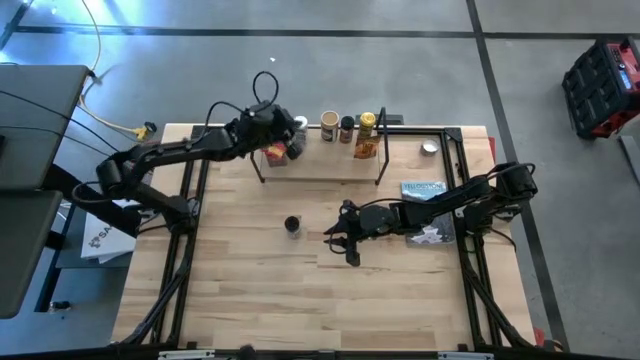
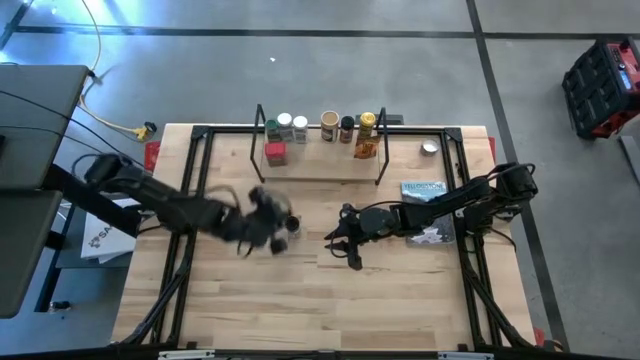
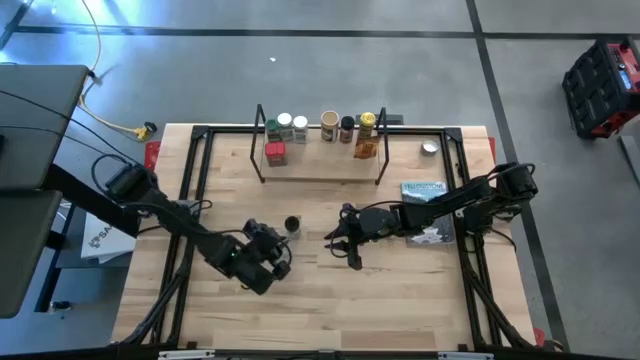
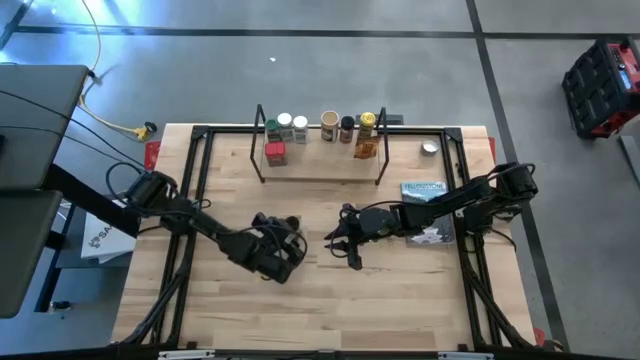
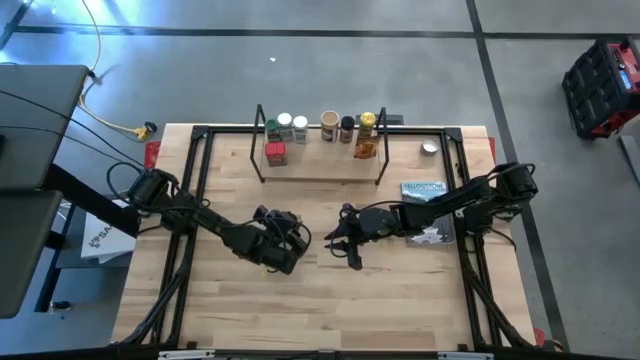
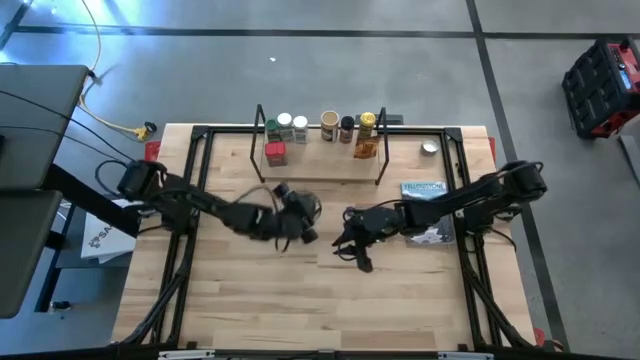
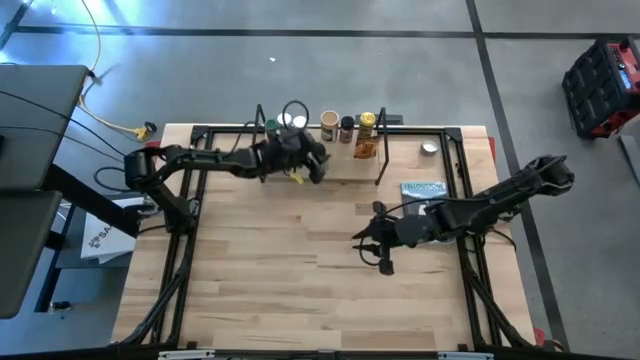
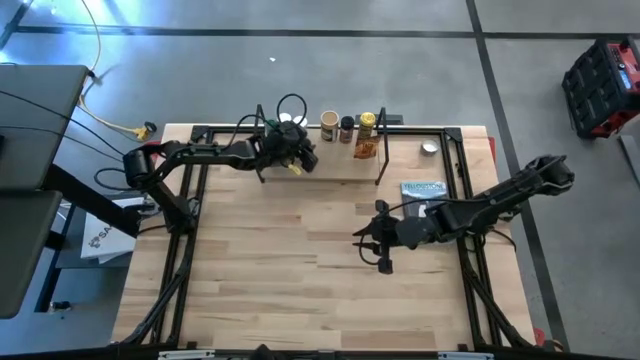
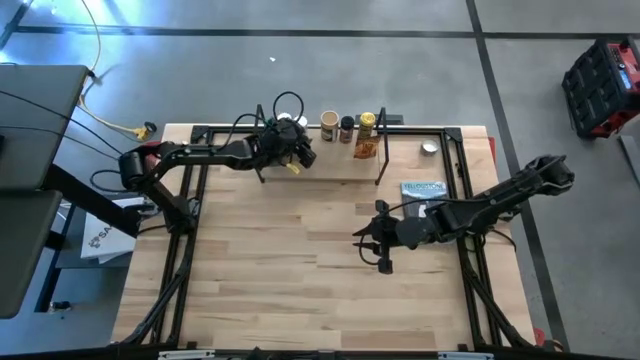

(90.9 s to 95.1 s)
Task: Shelf spices
Put the black seasoning bottle on the shelf

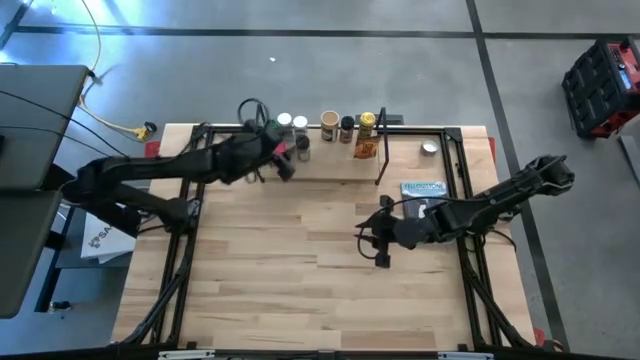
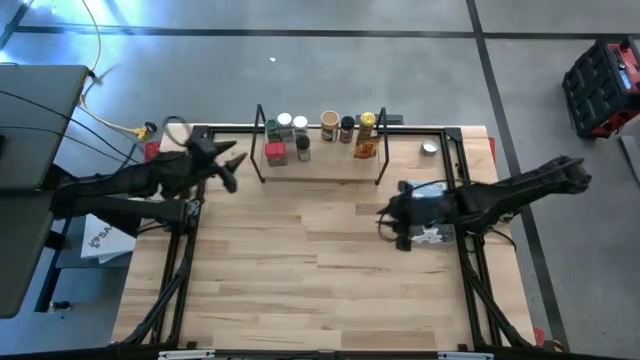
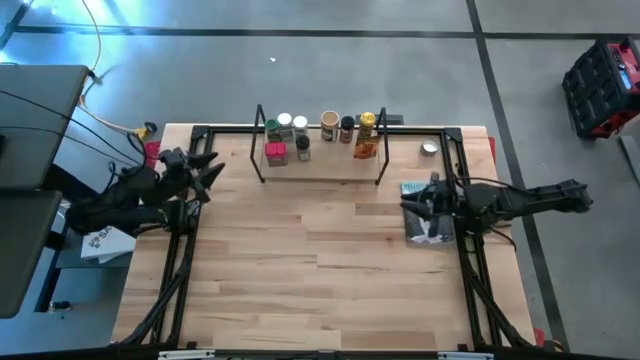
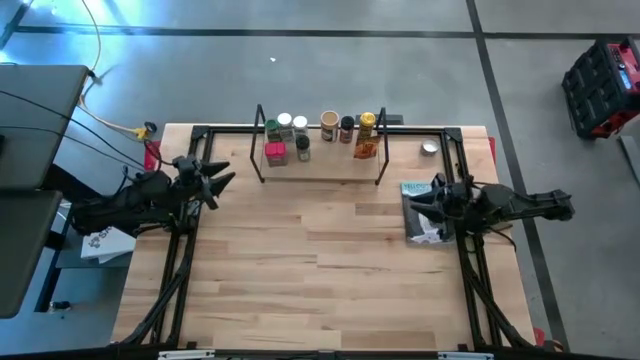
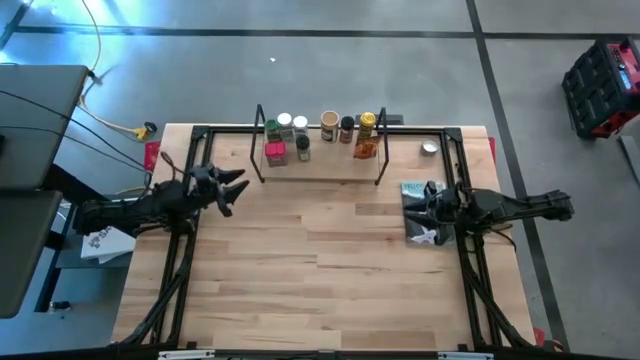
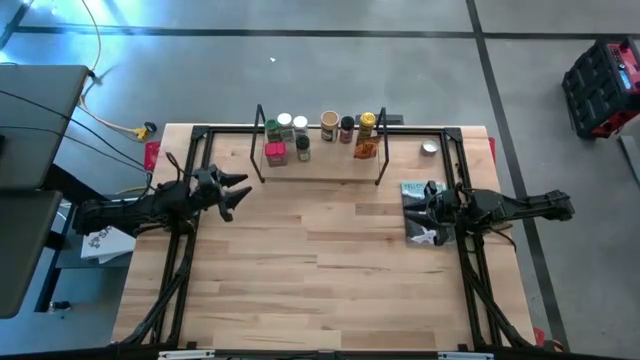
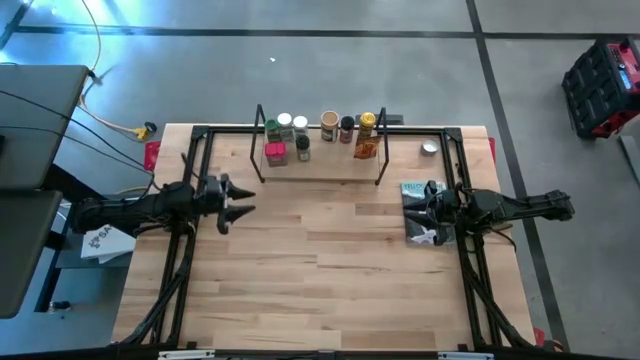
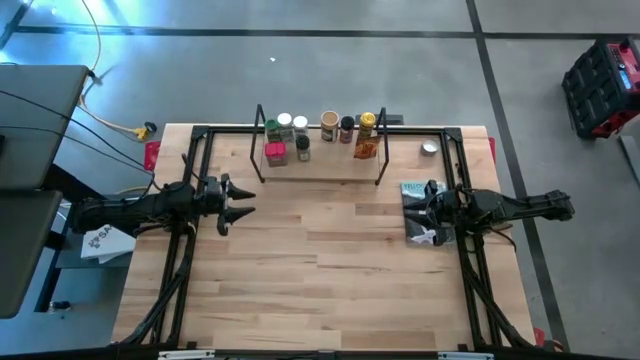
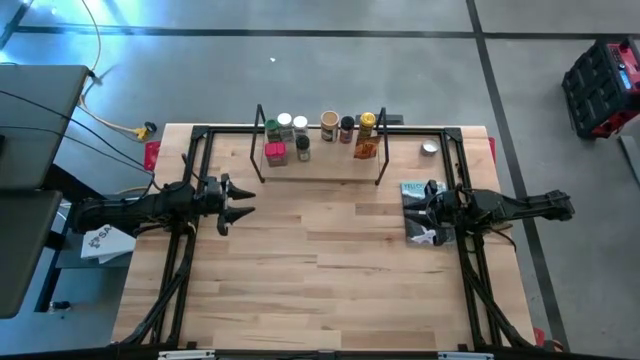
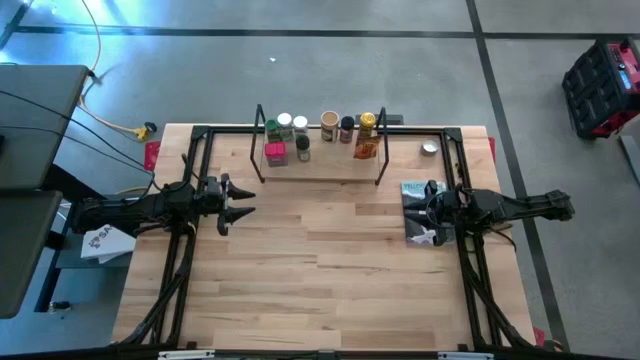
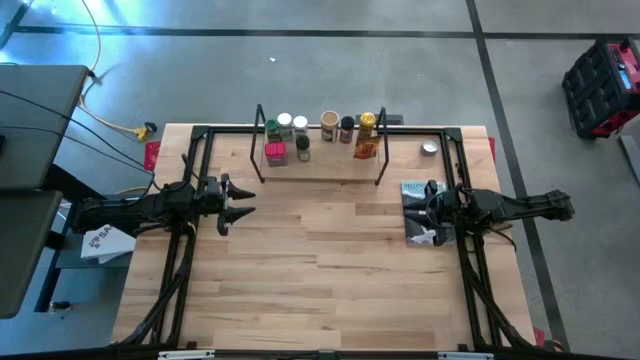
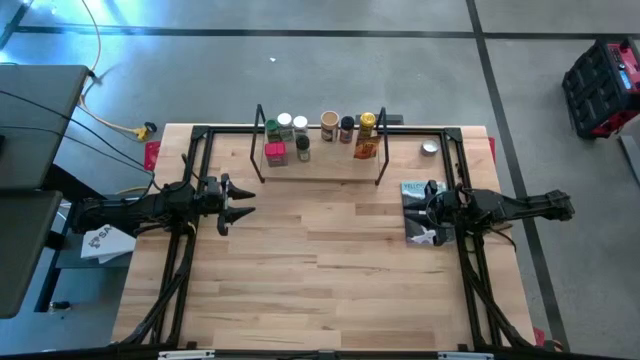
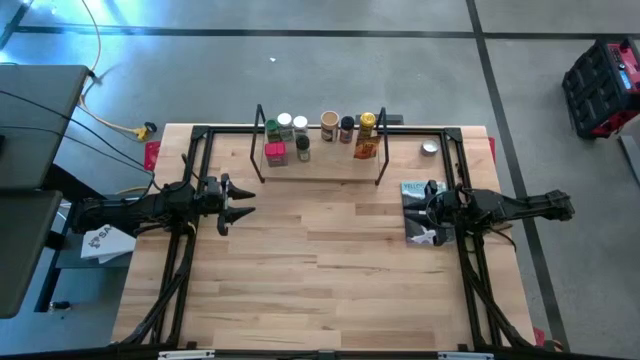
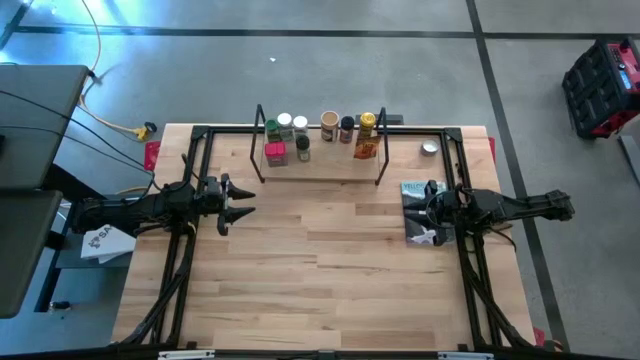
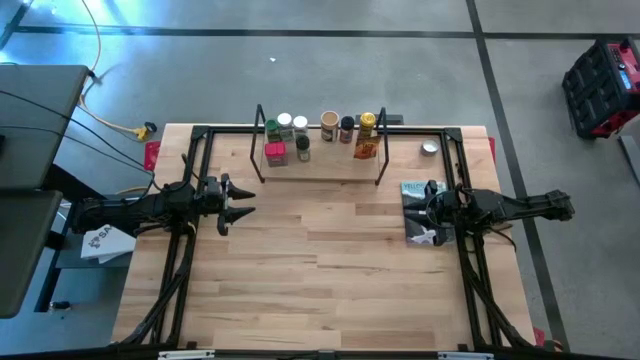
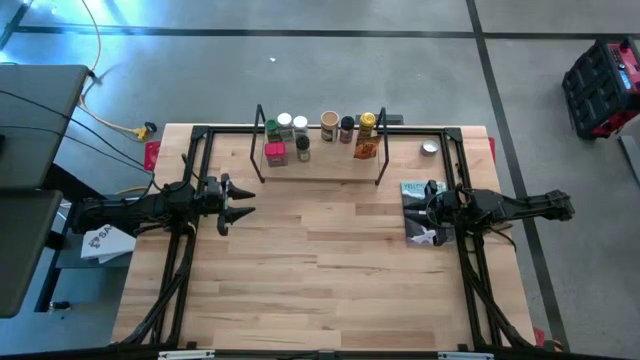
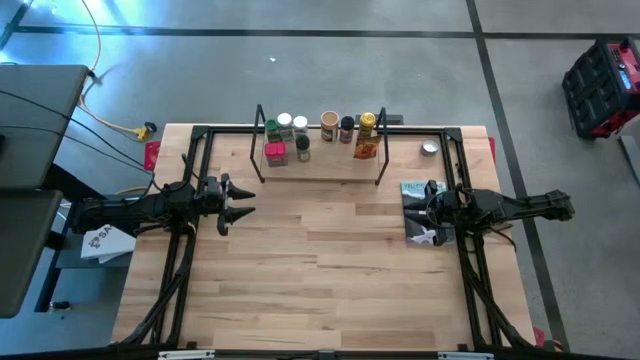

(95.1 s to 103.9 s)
Return to Home Position
